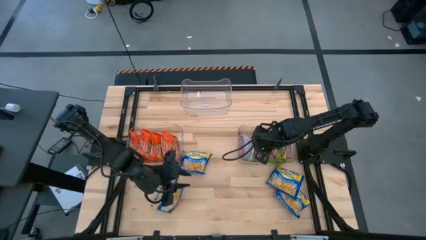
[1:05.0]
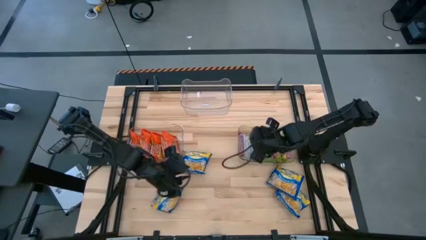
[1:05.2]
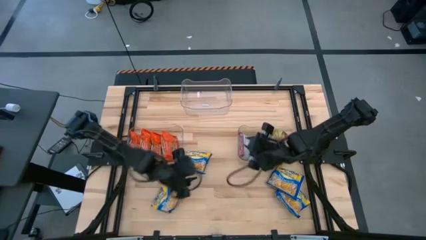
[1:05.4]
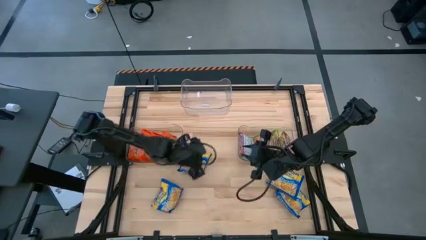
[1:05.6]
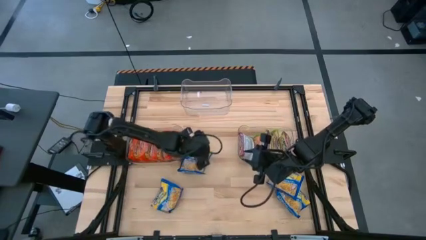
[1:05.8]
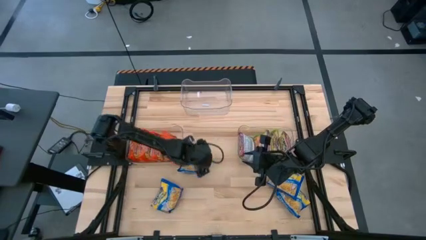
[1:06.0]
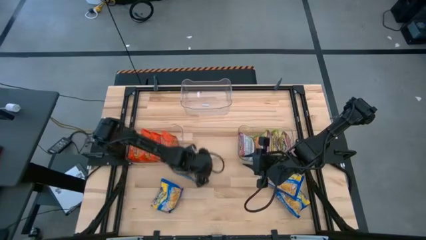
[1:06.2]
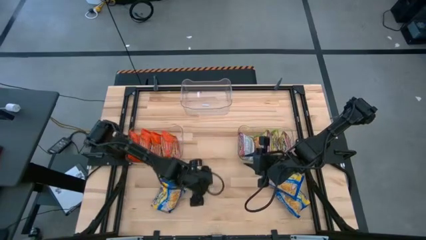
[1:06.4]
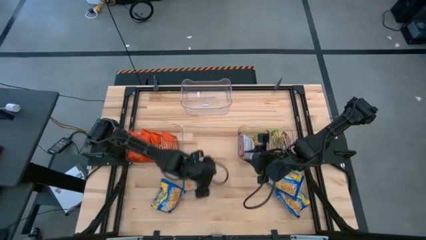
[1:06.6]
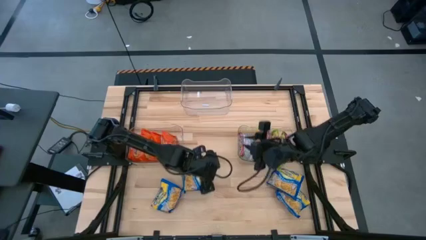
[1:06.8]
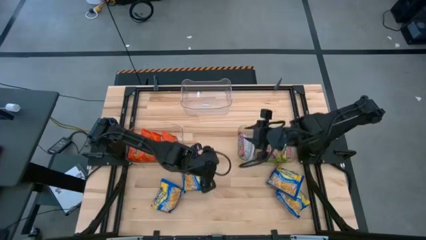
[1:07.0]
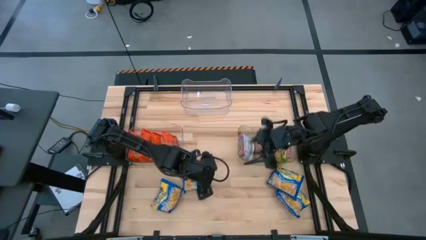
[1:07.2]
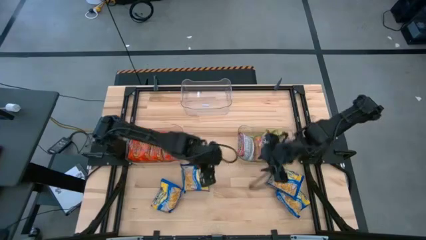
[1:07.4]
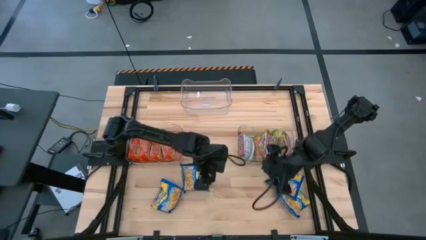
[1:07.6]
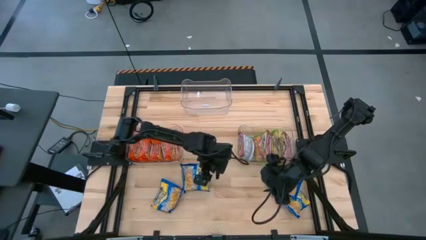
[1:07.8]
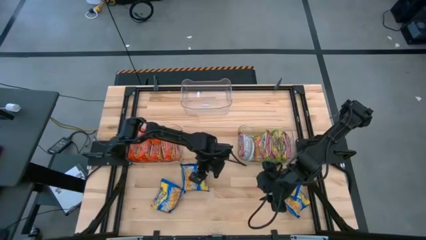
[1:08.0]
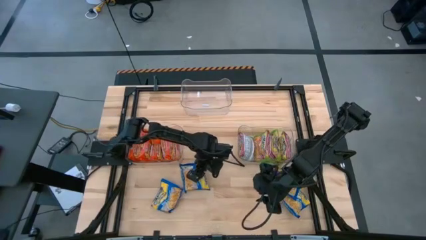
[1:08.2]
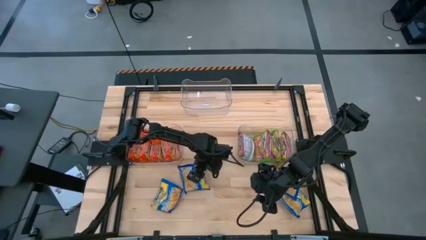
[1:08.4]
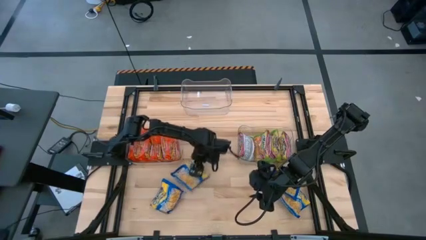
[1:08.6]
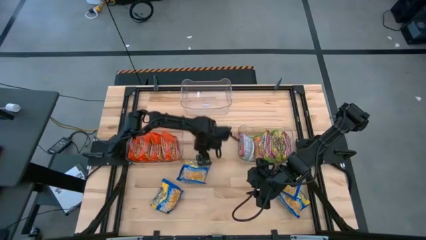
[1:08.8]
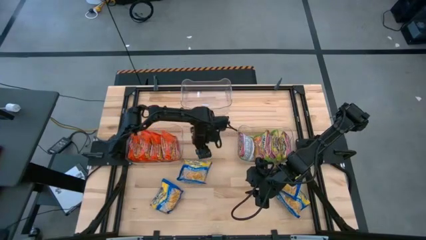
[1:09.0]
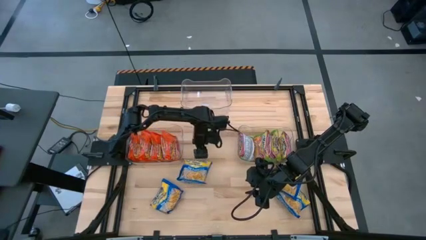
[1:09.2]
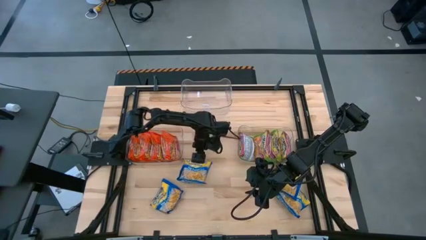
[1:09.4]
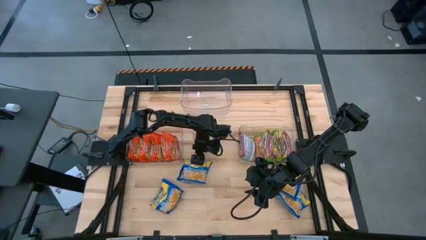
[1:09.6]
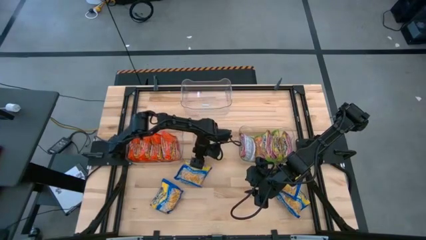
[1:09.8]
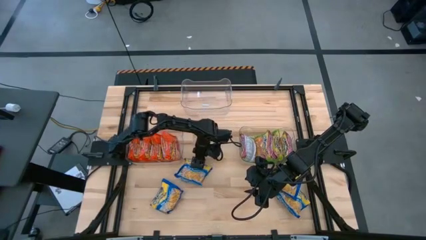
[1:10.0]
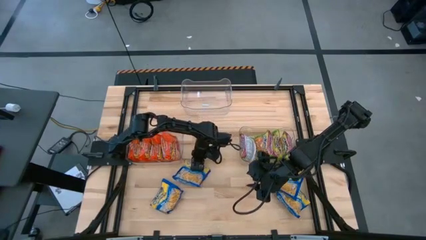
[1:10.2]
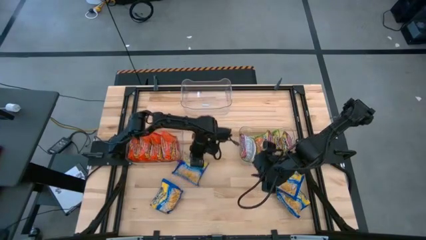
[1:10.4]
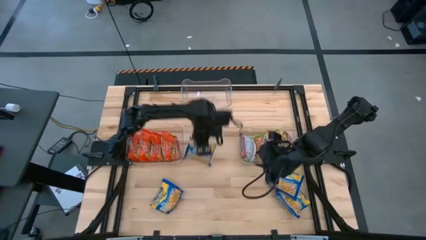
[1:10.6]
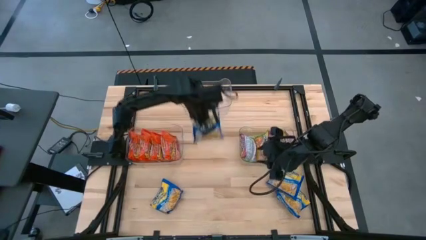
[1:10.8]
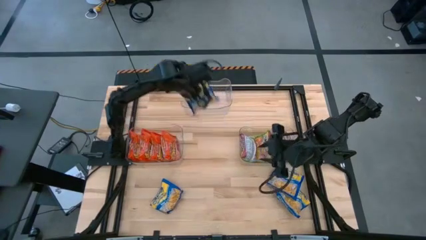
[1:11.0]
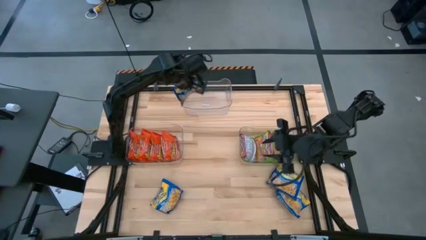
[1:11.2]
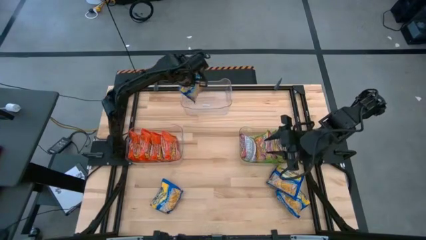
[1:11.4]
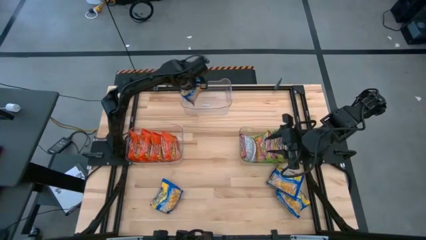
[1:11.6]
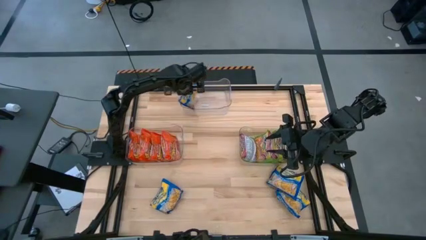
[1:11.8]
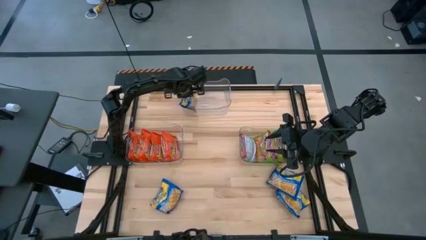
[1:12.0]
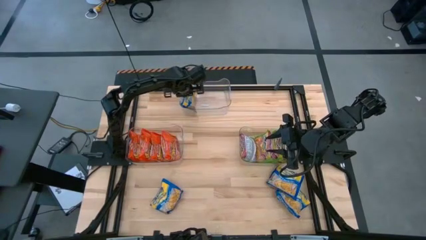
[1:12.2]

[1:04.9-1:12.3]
Task: Sort Maruchan noodles
Put the blue noodle from the middle into the top transparent bin

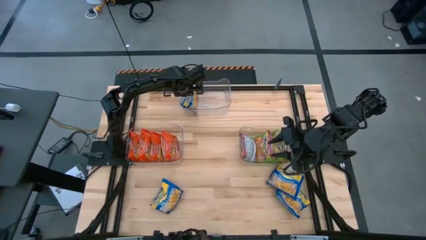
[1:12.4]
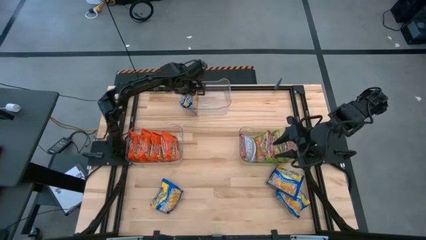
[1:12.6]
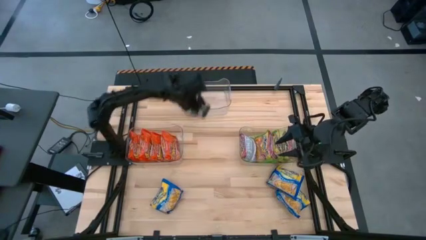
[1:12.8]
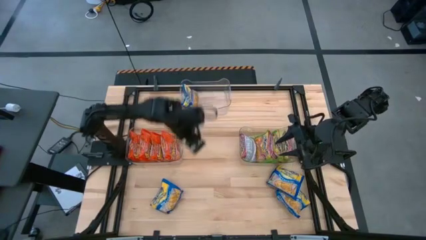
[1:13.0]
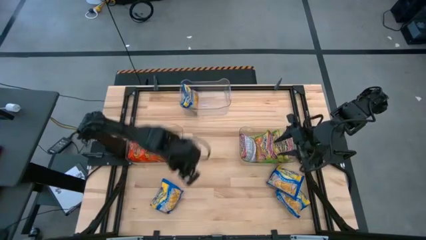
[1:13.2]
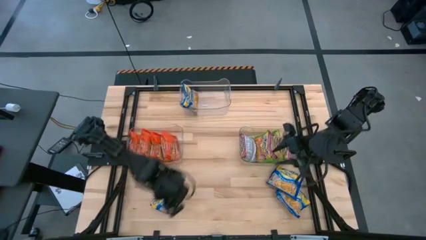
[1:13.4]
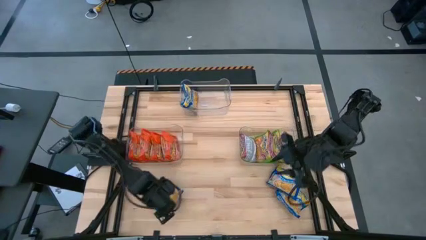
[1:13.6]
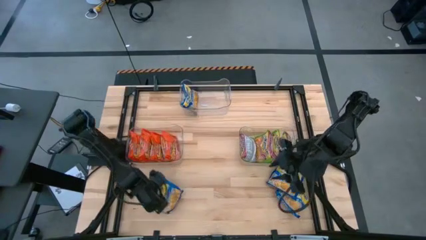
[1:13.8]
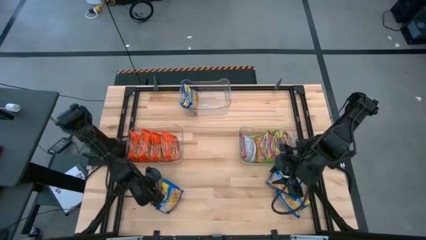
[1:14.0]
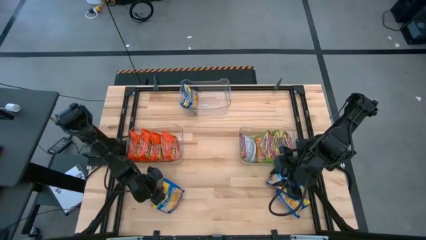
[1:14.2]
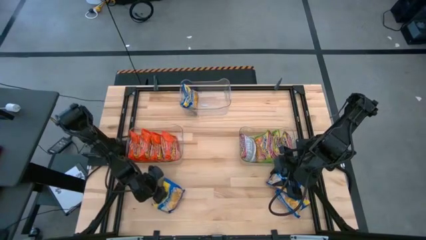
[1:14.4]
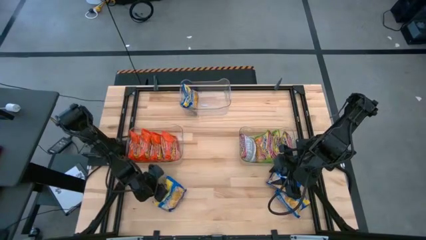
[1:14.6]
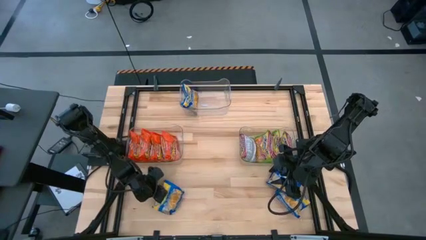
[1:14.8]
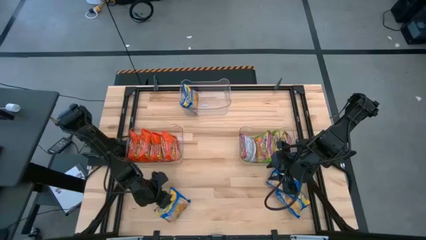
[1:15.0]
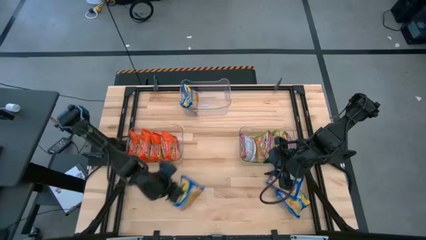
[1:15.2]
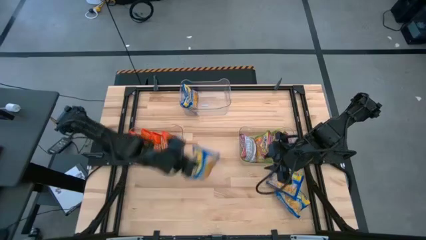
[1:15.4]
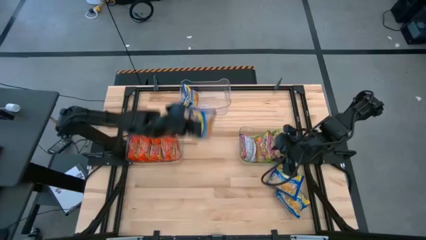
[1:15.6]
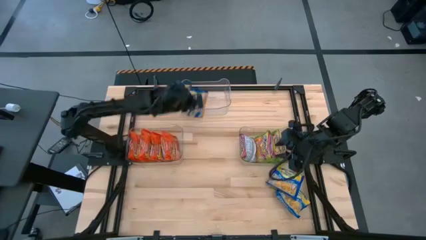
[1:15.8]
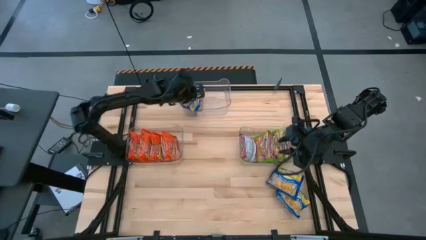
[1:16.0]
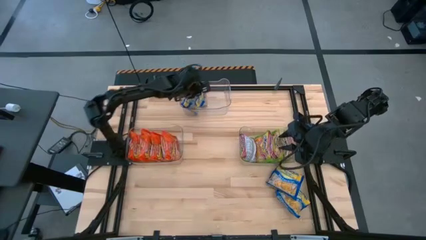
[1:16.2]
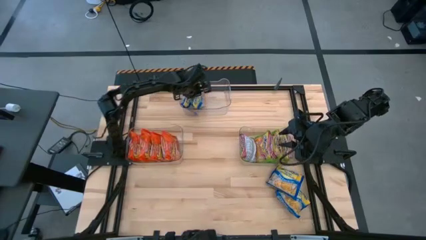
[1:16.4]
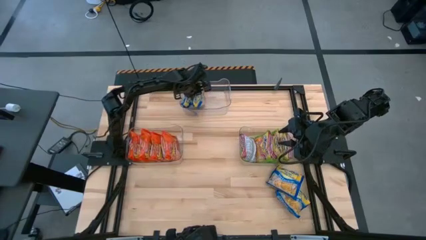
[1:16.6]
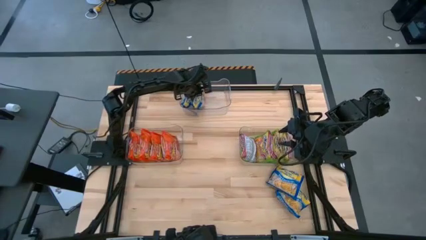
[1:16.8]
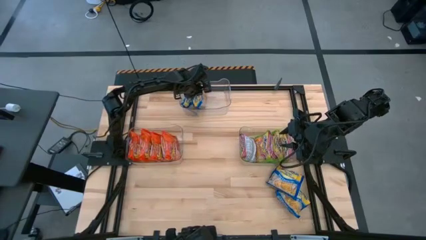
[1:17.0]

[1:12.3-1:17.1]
Put the blue noodle from the bottom right into the top transparent bin

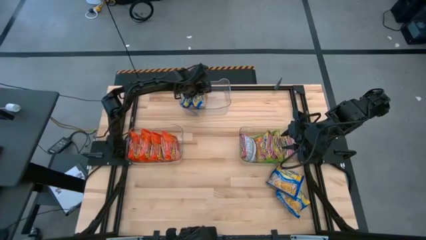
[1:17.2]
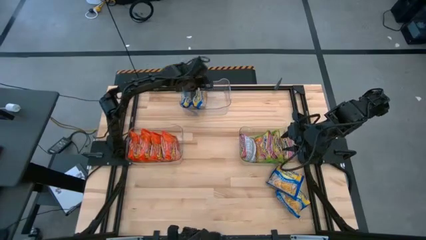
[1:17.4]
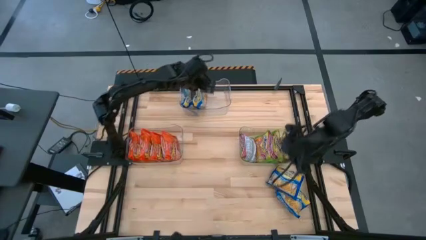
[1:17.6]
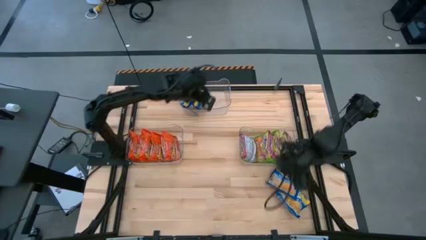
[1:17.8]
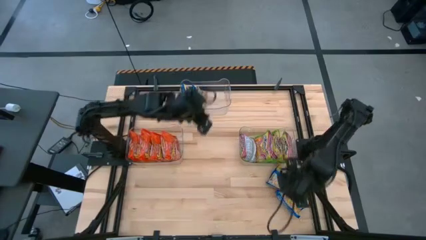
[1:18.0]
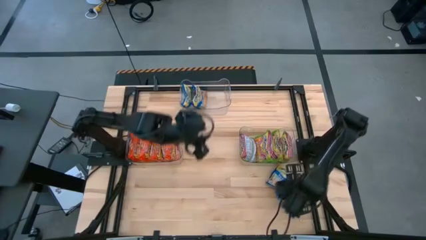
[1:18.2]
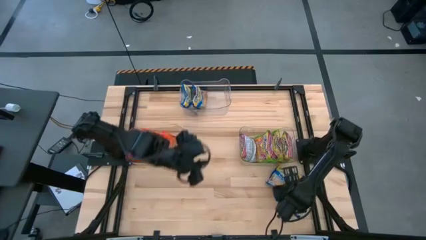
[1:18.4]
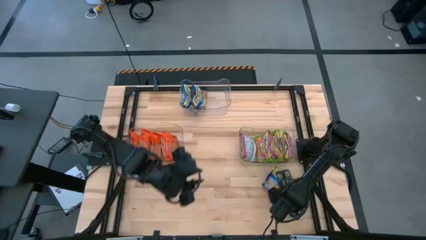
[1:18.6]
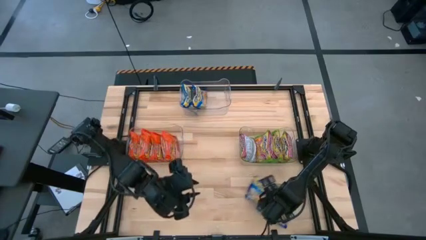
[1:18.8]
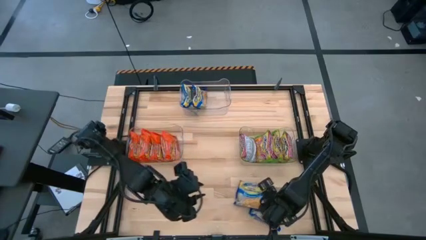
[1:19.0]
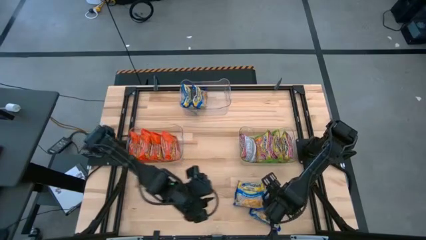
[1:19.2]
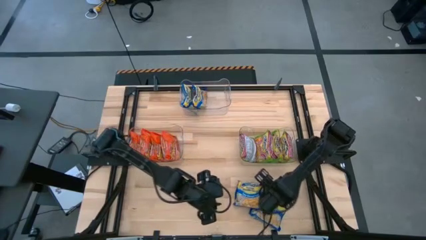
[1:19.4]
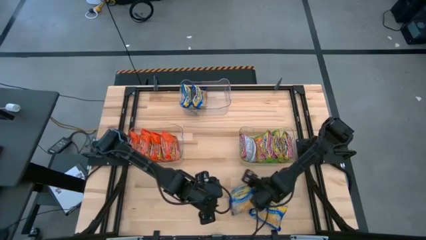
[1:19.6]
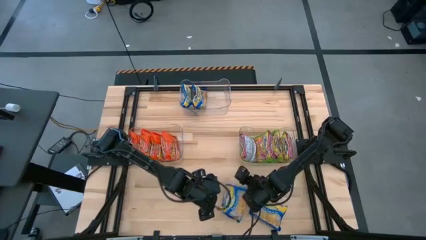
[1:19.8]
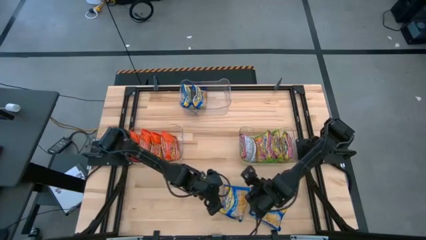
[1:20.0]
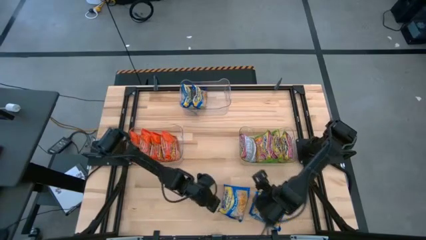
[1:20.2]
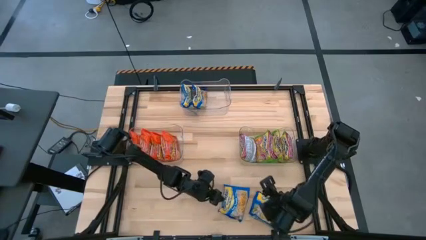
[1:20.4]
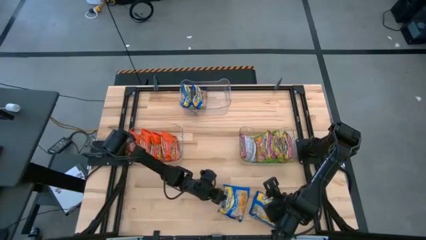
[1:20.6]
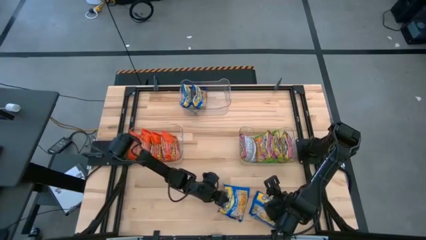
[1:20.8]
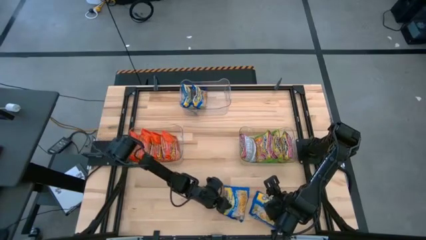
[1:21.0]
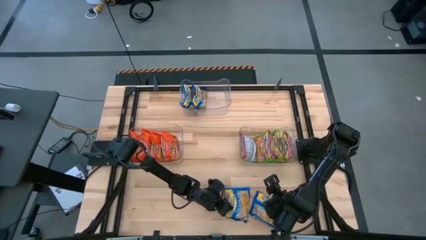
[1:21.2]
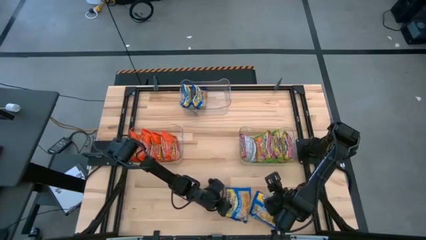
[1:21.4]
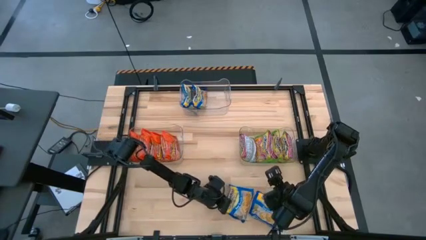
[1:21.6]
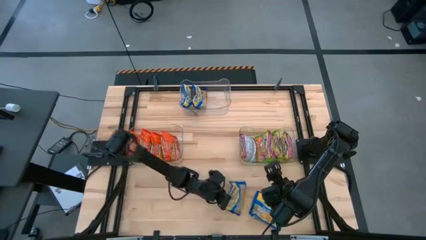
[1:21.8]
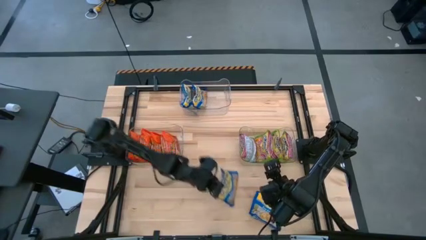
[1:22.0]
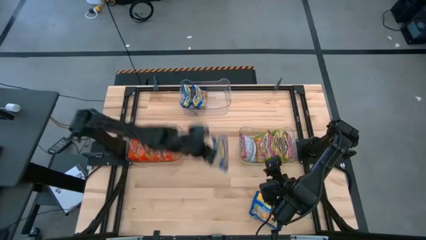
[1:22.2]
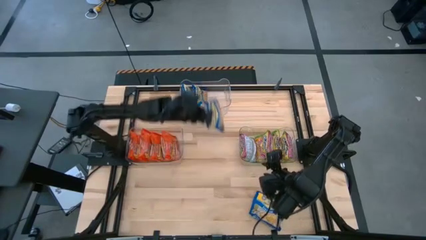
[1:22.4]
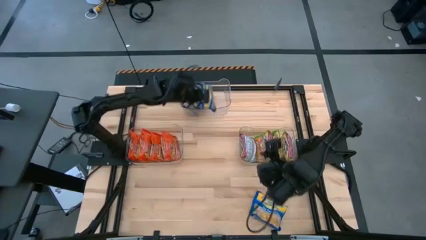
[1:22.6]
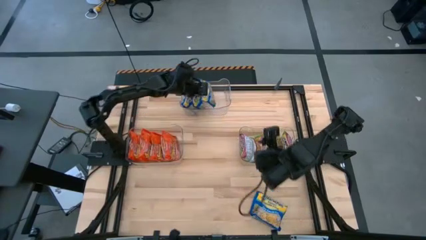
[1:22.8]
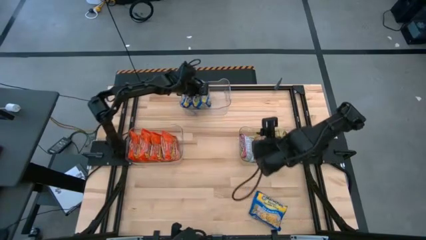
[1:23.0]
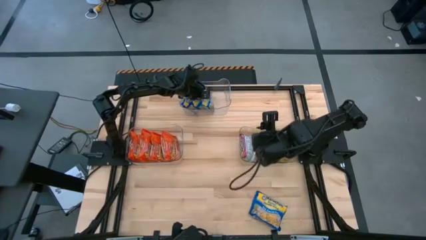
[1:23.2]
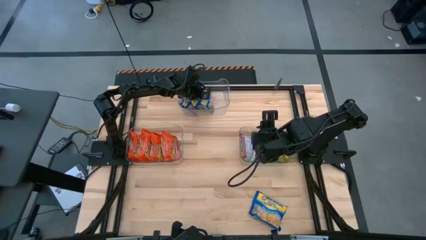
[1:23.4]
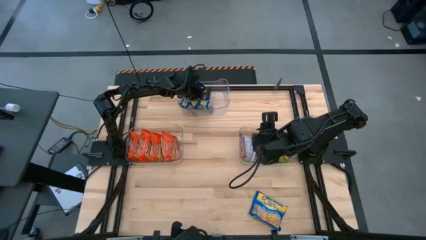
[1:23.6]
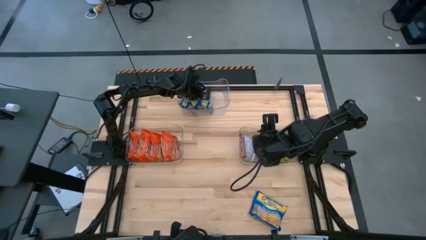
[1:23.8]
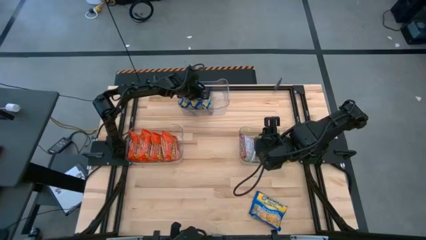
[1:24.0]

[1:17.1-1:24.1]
Put the blue noodle from the bottom right into the top transparent bin
